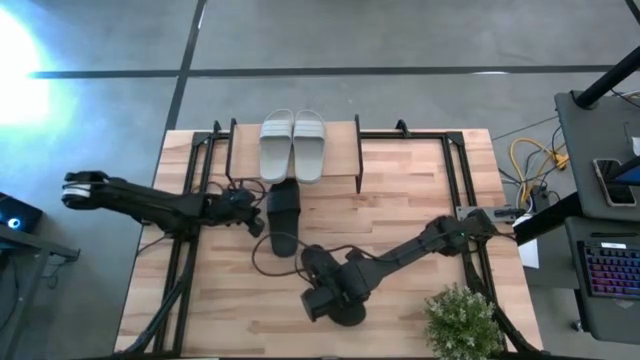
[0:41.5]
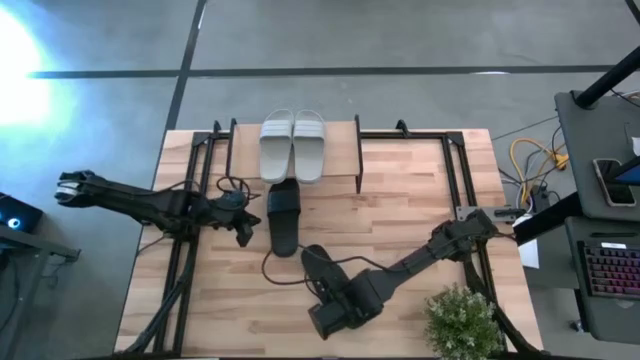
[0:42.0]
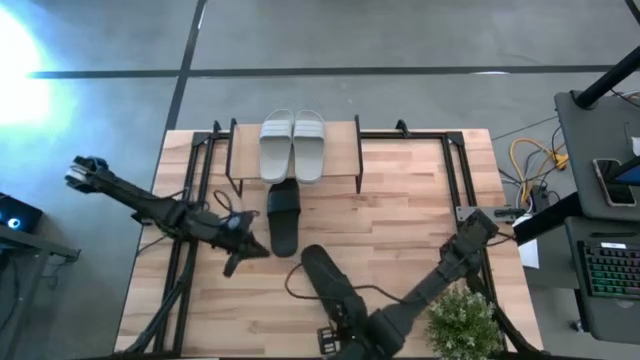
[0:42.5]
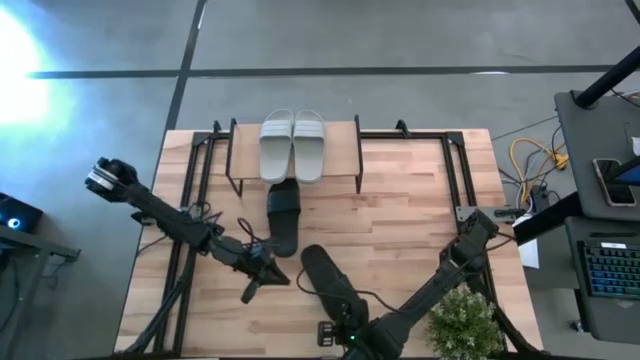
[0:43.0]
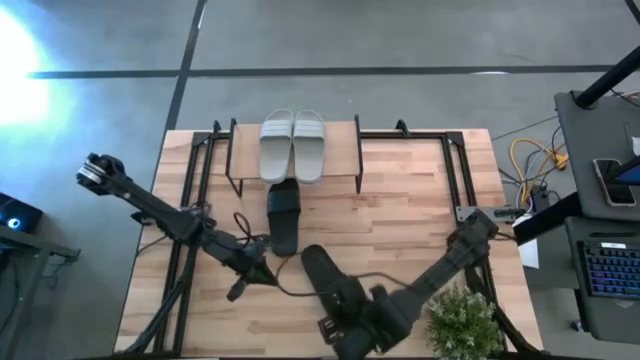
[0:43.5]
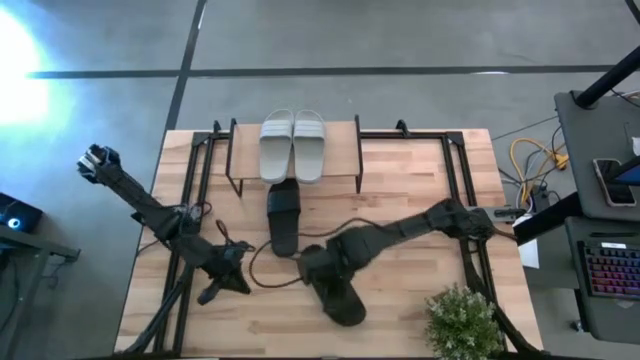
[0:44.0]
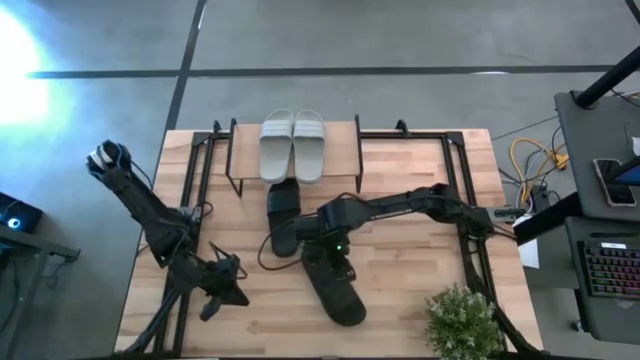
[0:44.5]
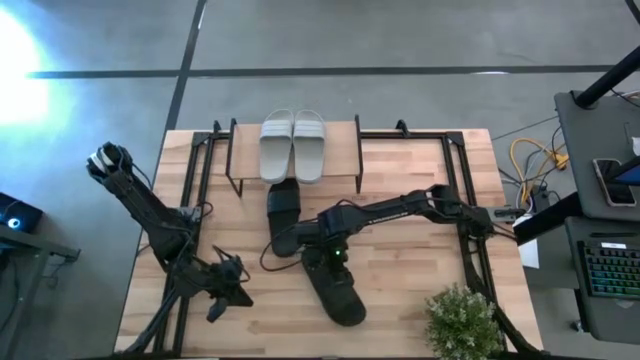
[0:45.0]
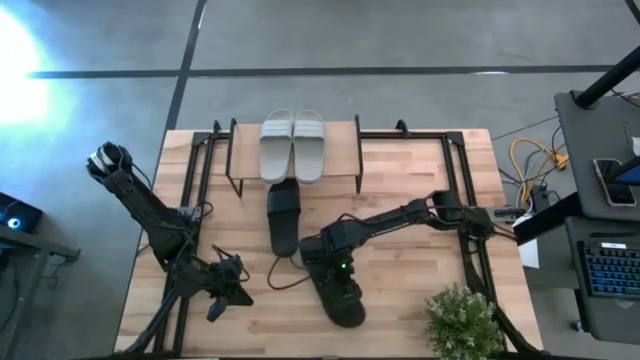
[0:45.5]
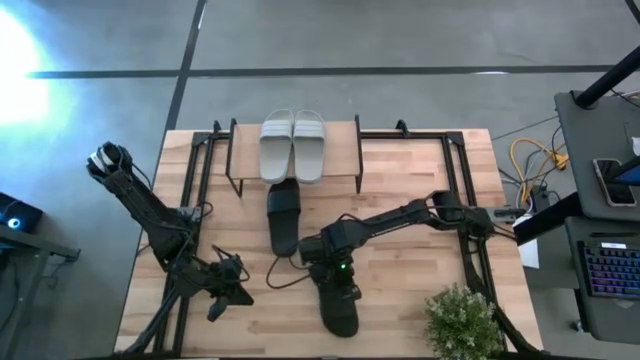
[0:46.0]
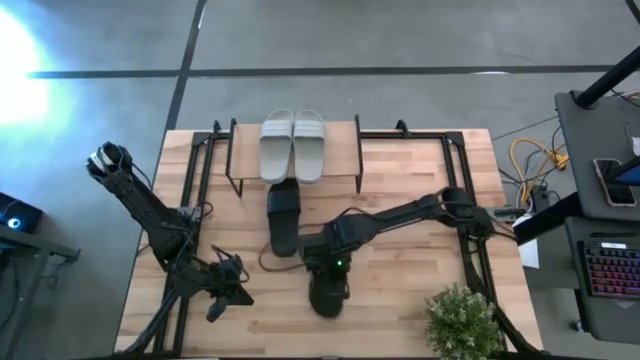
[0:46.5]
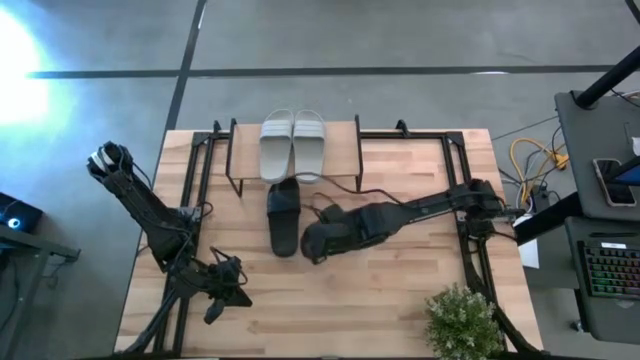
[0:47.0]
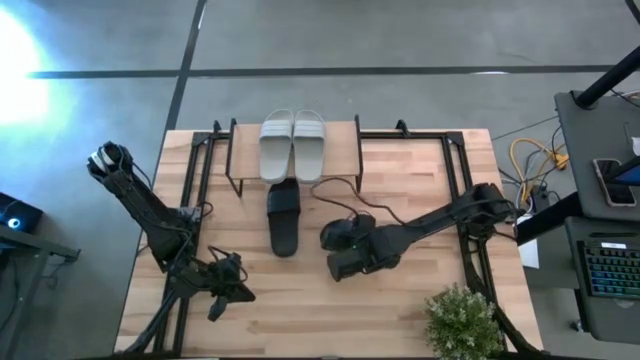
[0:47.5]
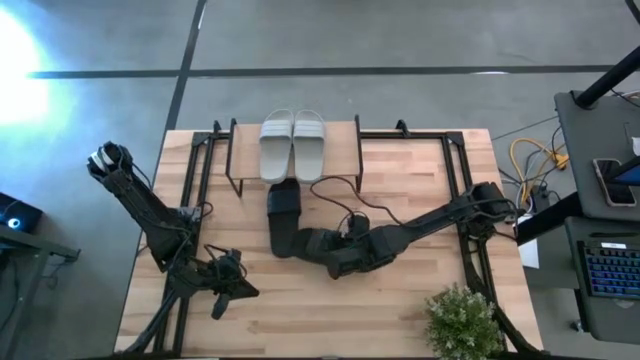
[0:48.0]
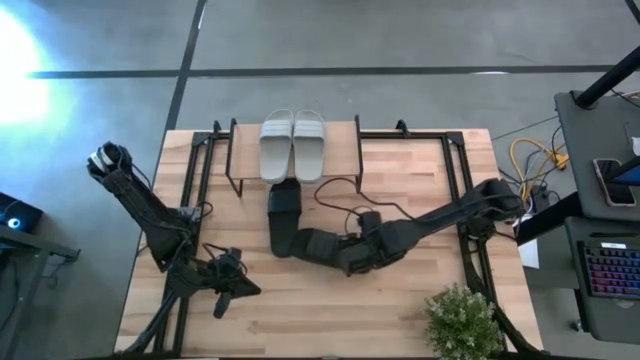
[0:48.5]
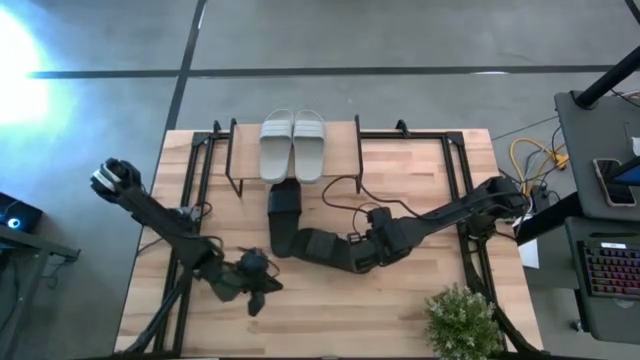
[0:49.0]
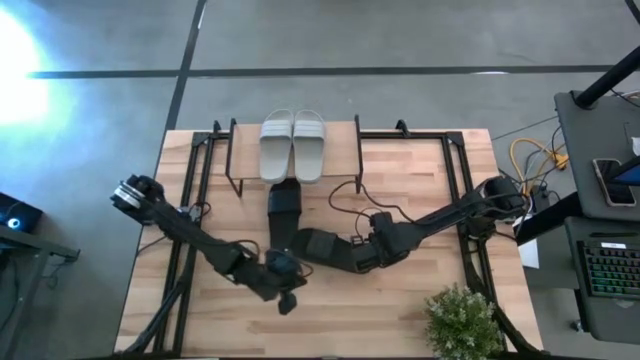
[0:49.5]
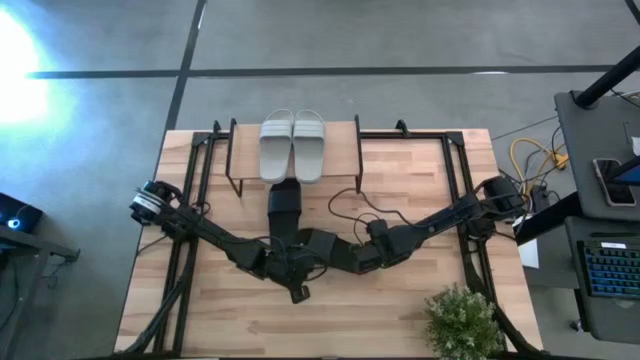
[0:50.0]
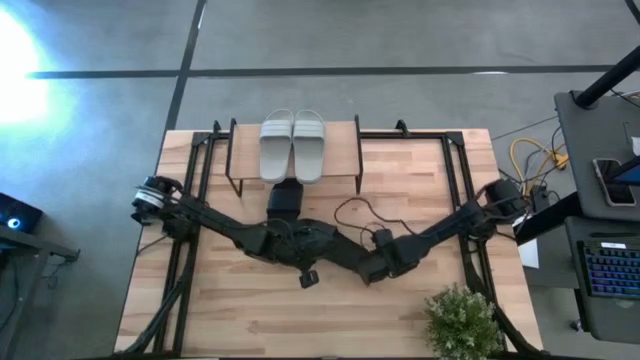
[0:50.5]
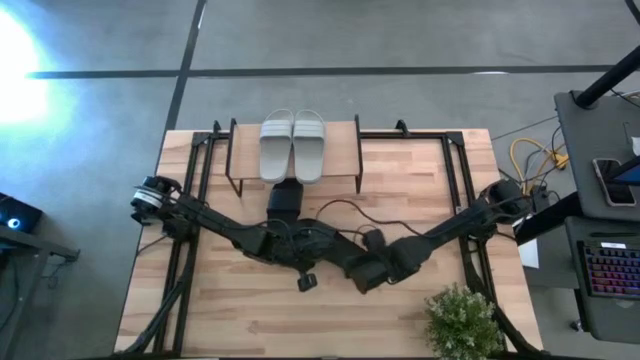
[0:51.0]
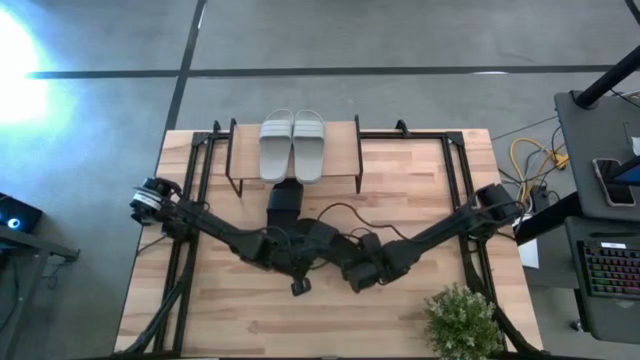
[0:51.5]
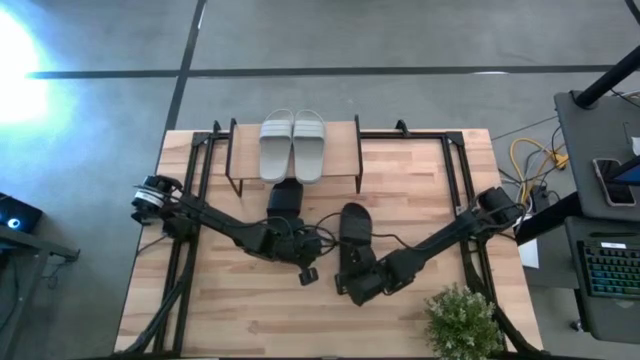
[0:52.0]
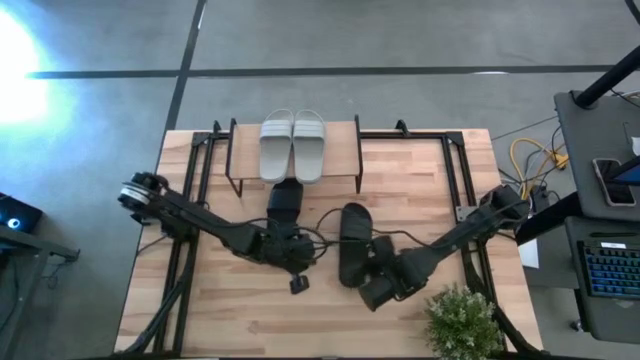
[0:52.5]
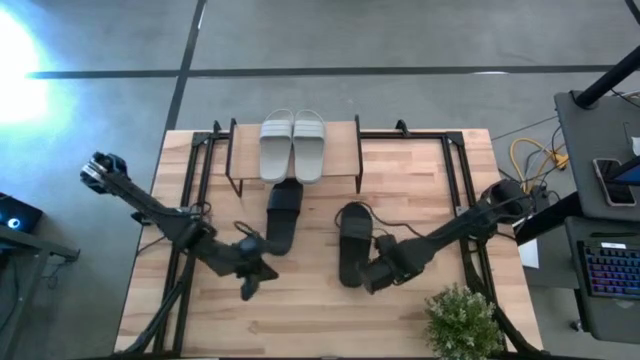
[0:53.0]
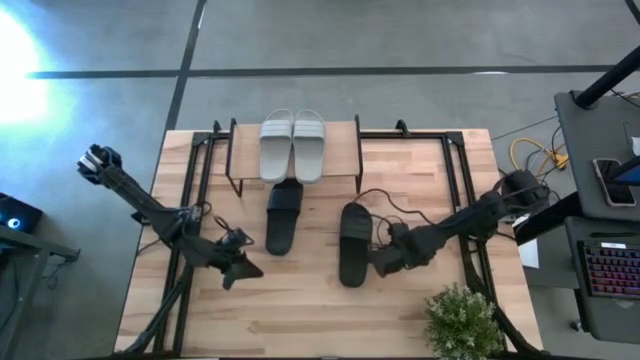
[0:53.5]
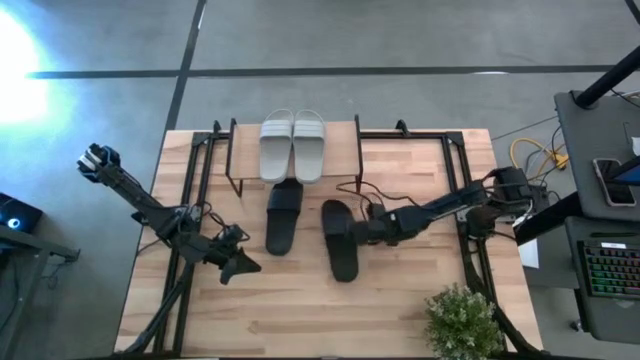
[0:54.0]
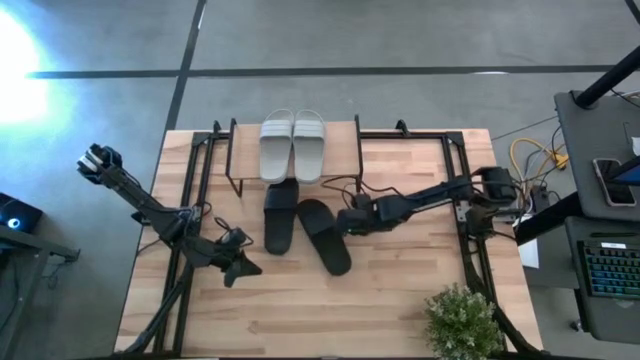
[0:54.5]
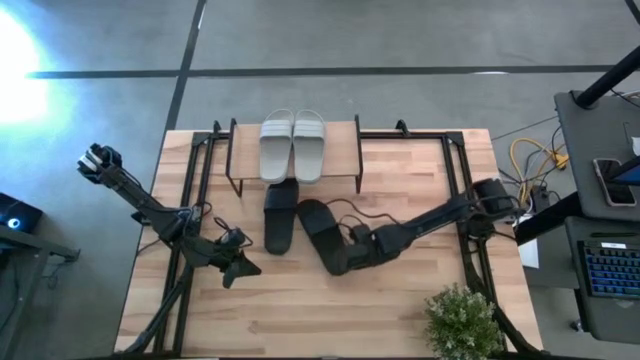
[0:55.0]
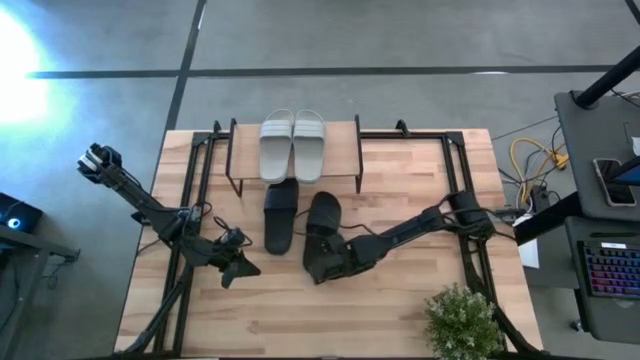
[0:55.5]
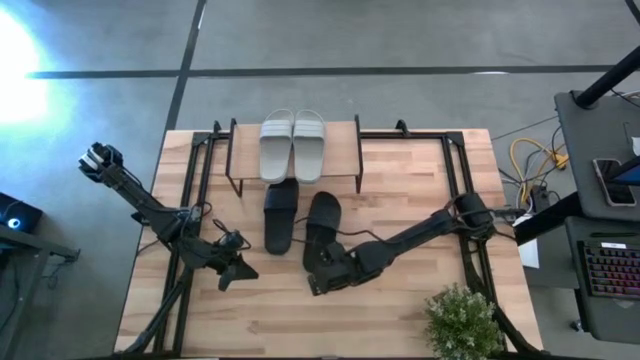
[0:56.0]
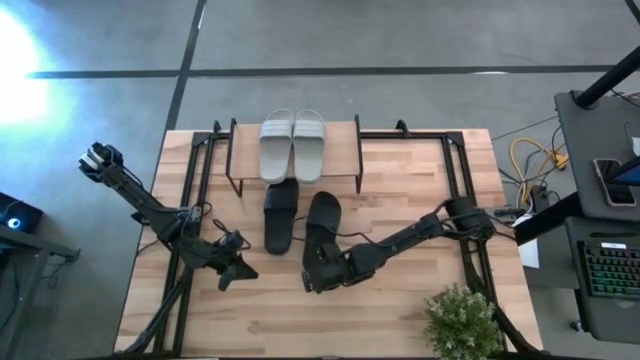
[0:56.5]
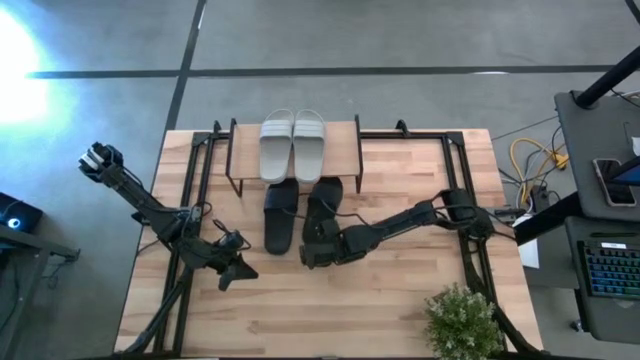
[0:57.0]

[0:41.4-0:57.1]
Task: Pick and place slides into the shelf
Put the black slide under the shelf

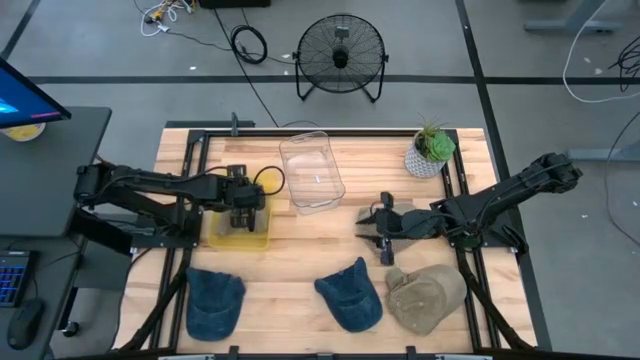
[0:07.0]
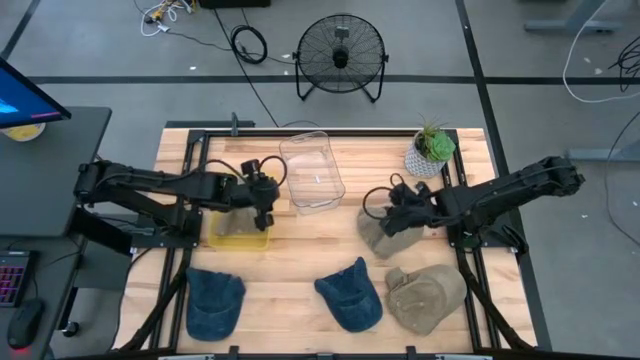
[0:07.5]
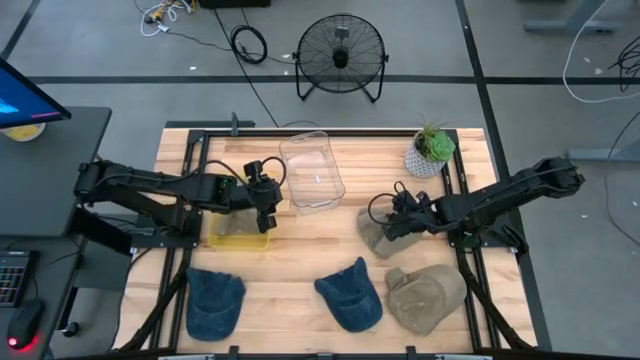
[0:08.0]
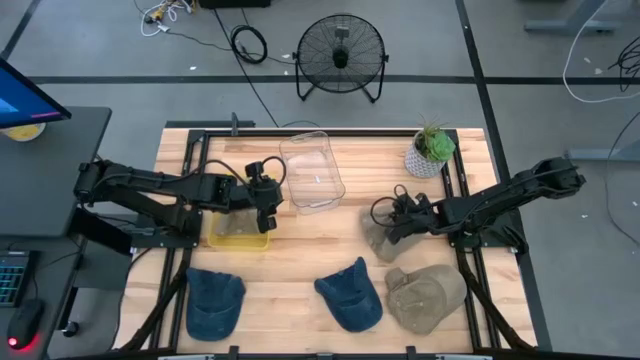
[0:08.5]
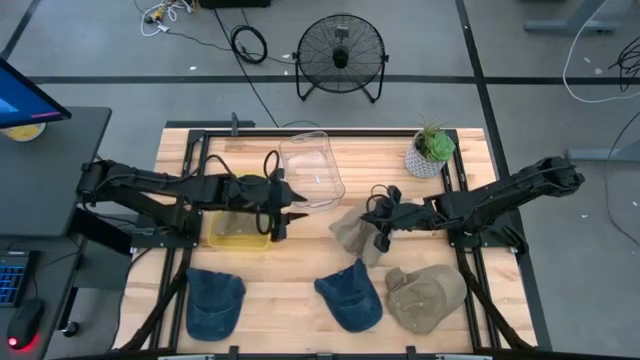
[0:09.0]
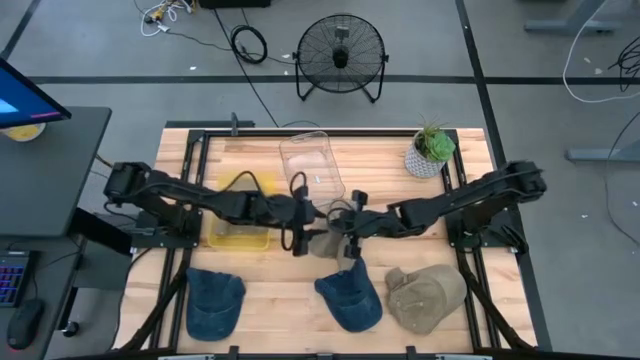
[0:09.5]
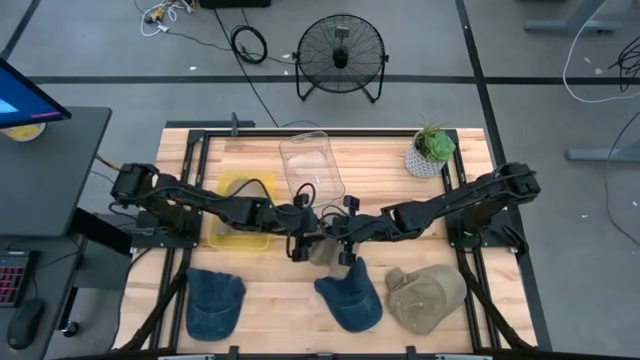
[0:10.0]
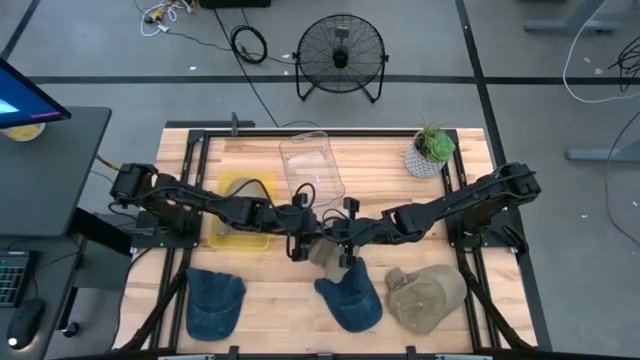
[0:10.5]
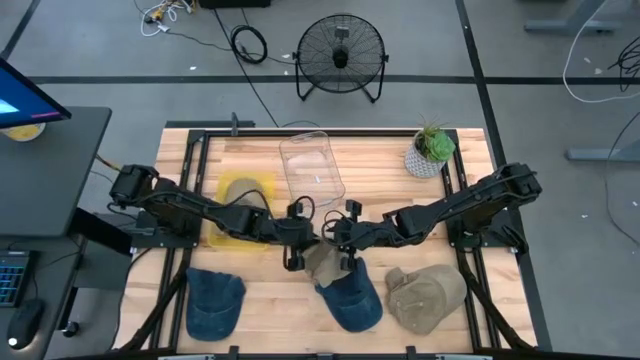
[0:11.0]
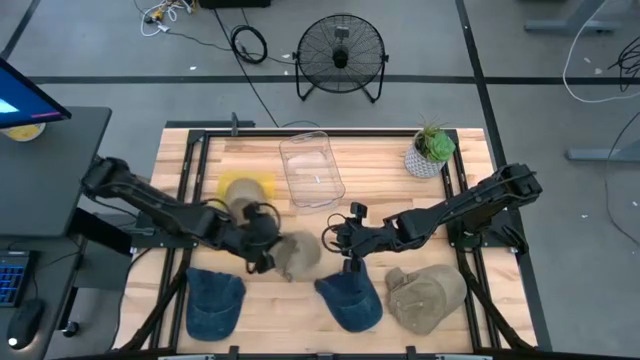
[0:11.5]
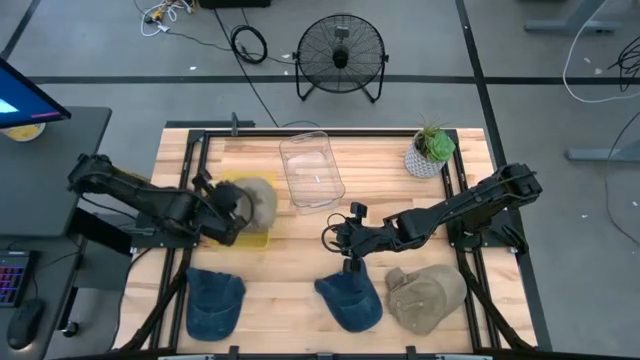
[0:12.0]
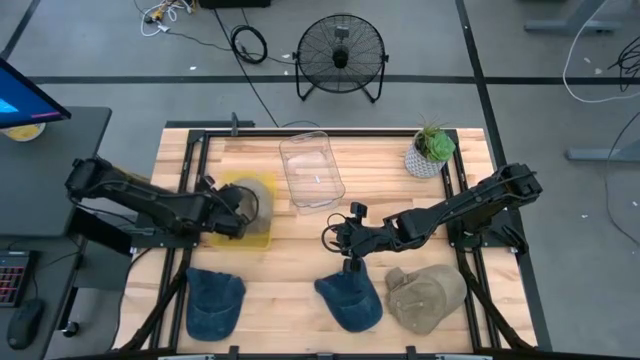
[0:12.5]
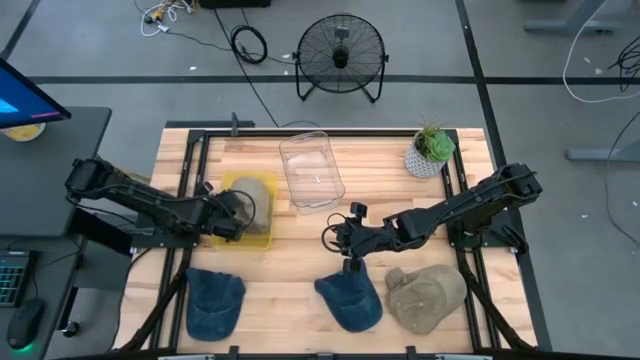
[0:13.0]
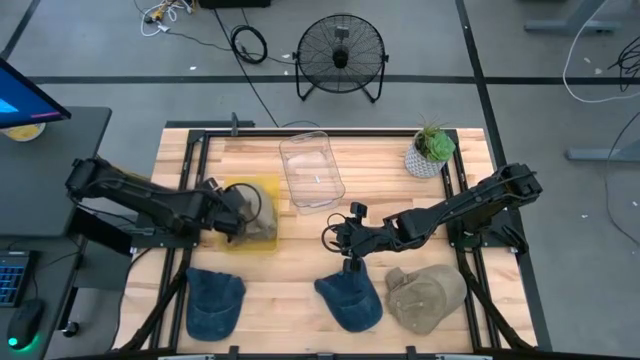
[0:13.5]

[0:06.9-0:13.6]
Task: Pick & Place hat
Put the top brown cap into the yellow bin
